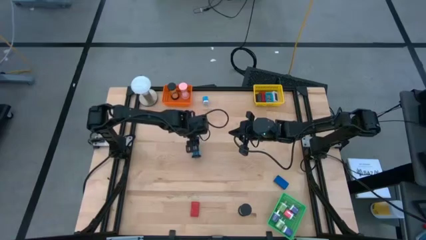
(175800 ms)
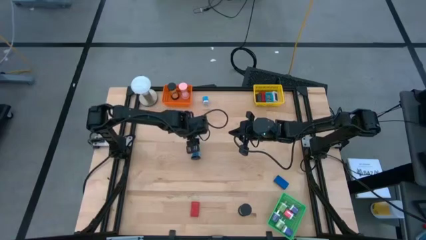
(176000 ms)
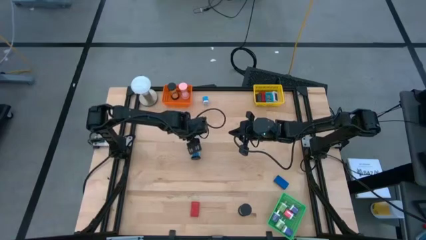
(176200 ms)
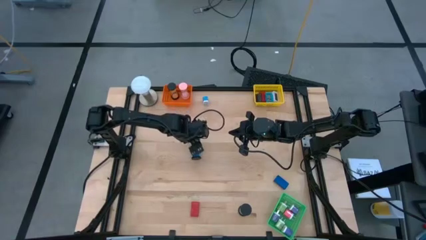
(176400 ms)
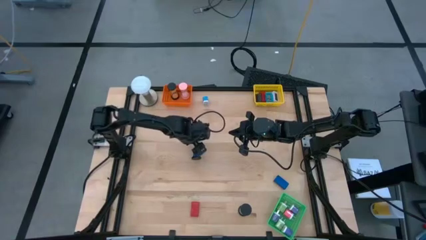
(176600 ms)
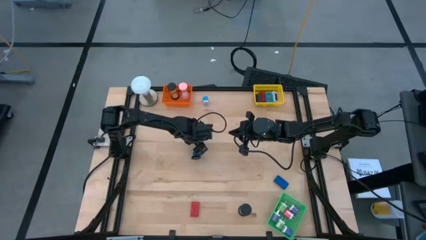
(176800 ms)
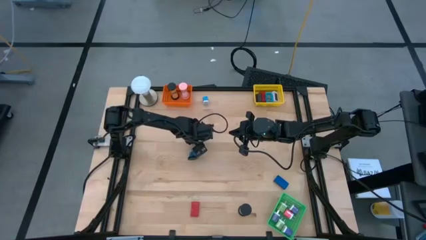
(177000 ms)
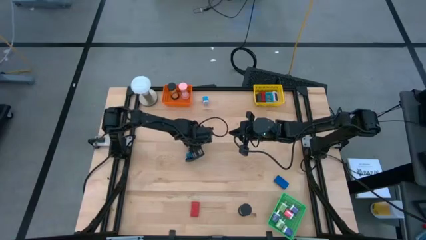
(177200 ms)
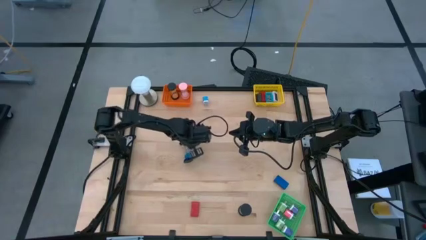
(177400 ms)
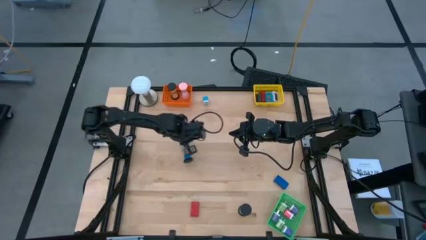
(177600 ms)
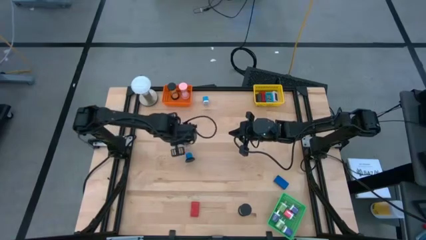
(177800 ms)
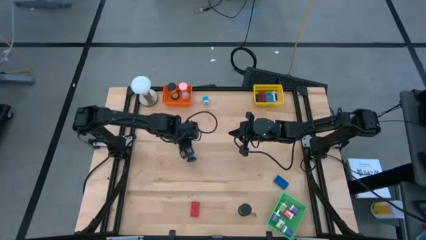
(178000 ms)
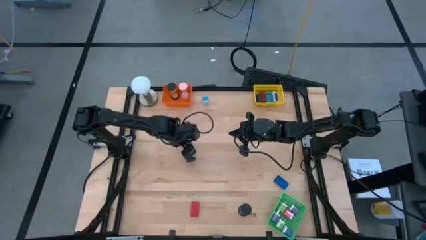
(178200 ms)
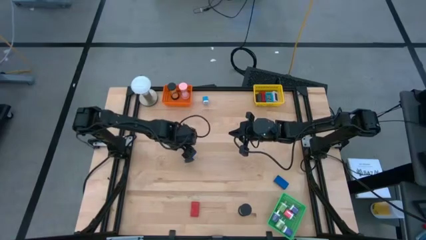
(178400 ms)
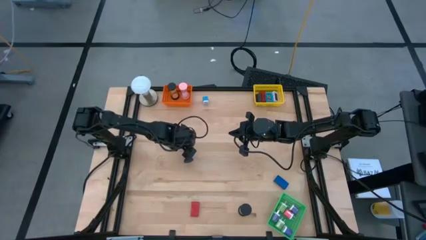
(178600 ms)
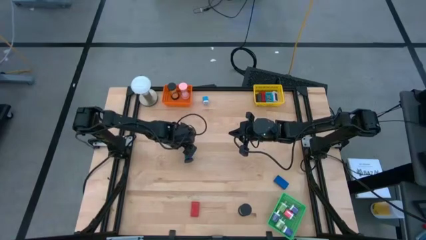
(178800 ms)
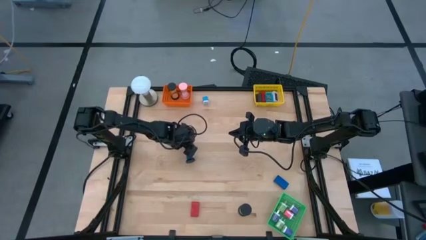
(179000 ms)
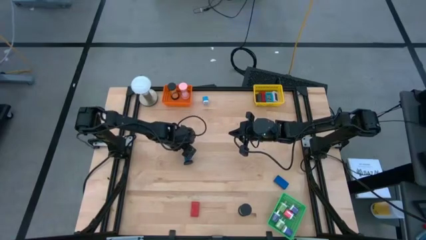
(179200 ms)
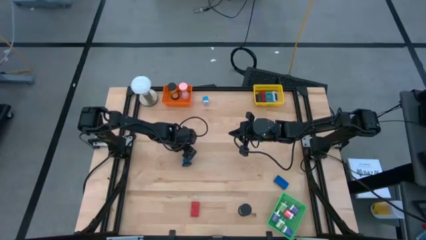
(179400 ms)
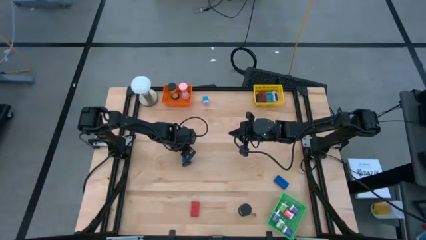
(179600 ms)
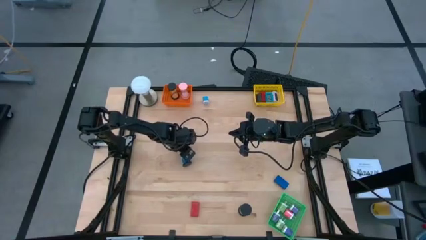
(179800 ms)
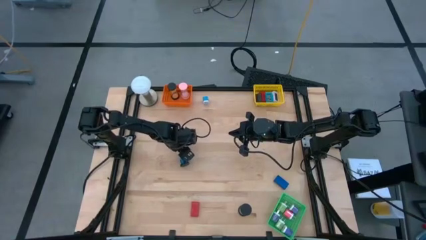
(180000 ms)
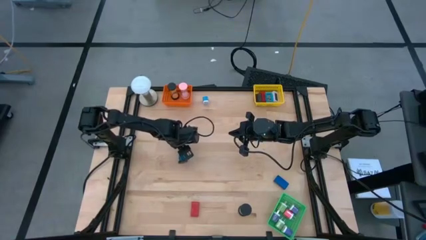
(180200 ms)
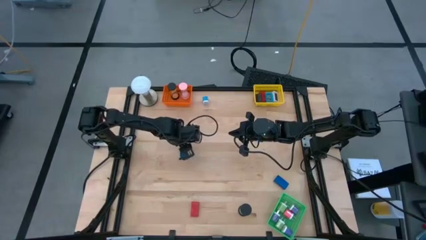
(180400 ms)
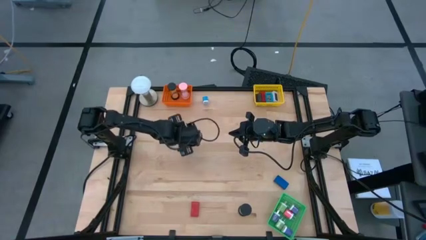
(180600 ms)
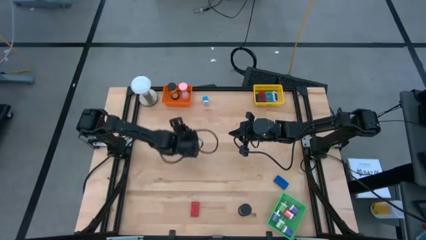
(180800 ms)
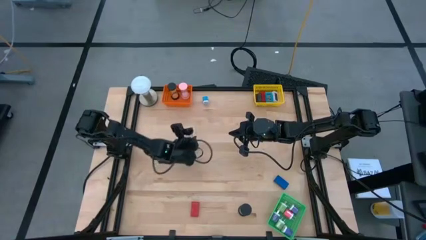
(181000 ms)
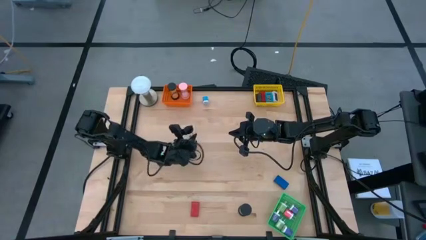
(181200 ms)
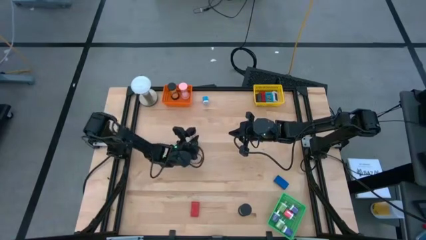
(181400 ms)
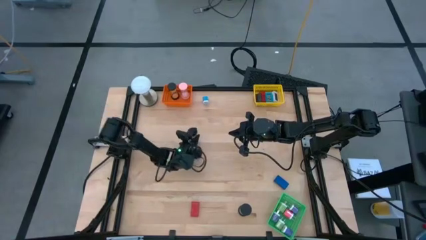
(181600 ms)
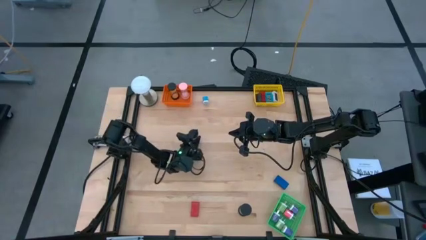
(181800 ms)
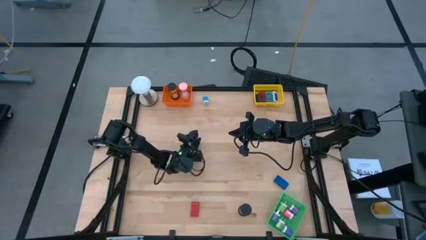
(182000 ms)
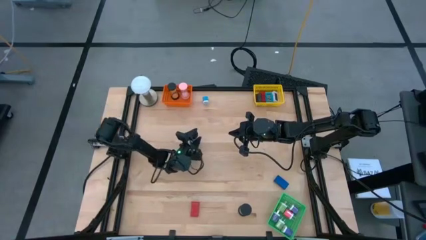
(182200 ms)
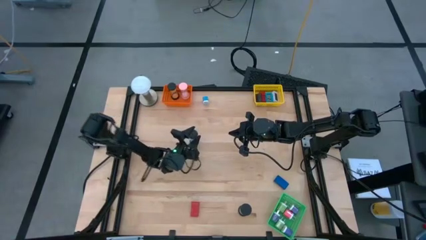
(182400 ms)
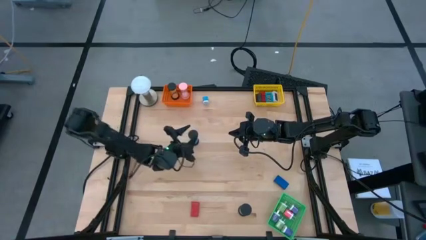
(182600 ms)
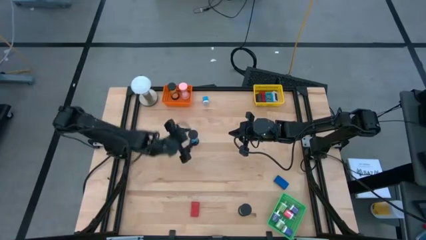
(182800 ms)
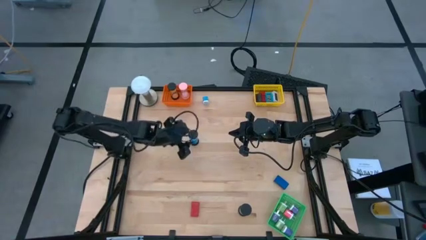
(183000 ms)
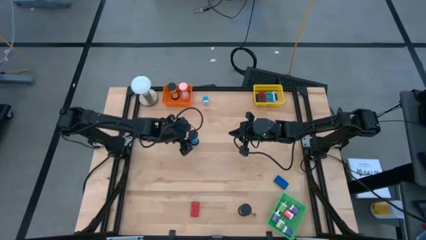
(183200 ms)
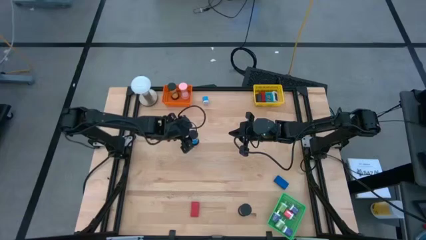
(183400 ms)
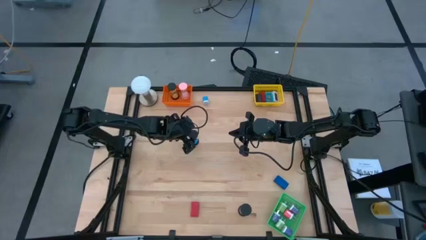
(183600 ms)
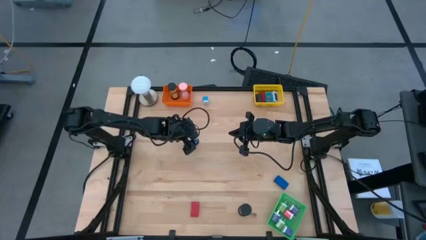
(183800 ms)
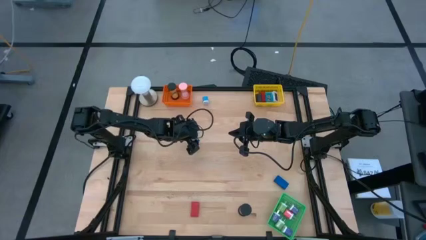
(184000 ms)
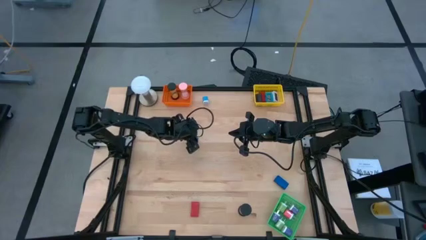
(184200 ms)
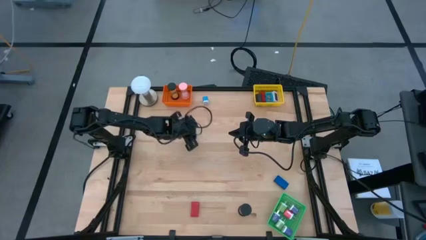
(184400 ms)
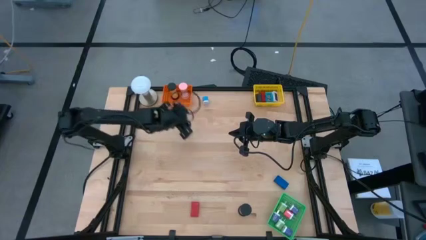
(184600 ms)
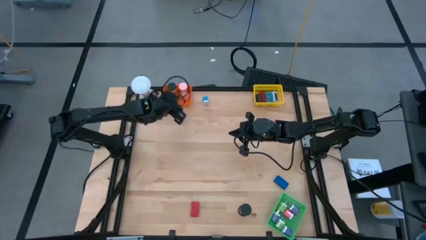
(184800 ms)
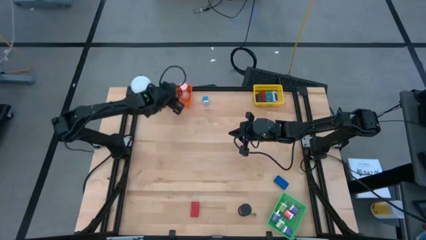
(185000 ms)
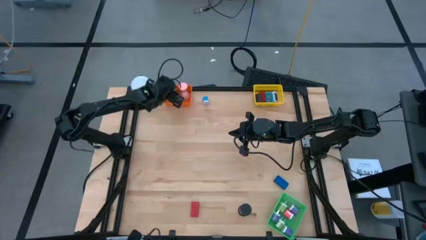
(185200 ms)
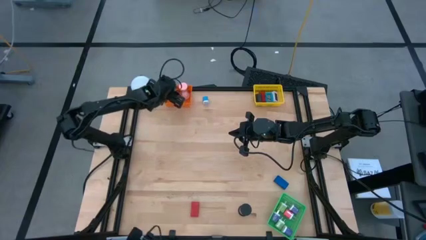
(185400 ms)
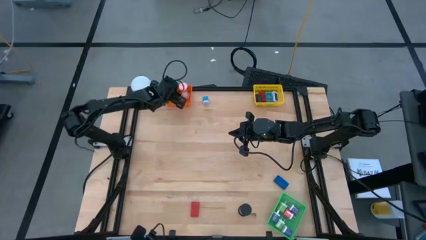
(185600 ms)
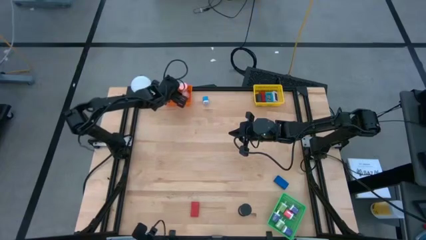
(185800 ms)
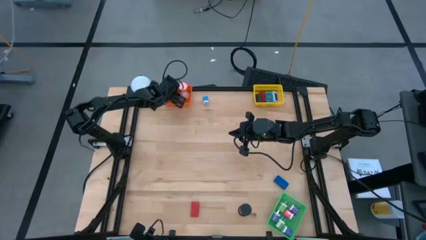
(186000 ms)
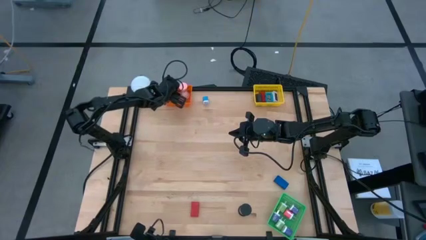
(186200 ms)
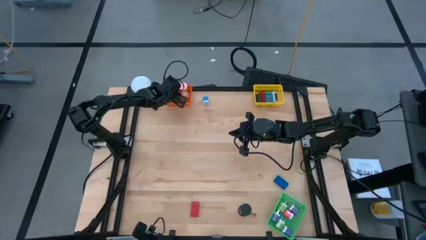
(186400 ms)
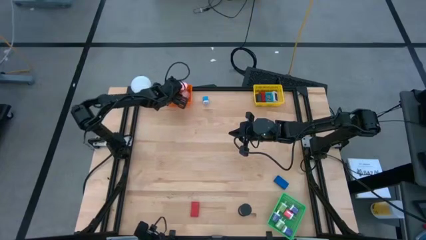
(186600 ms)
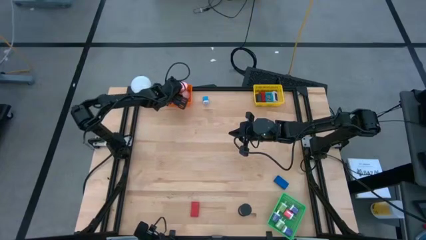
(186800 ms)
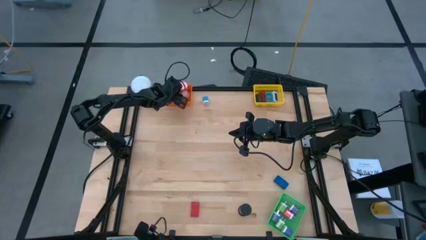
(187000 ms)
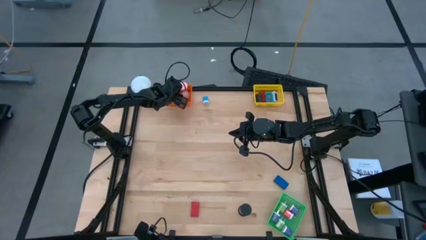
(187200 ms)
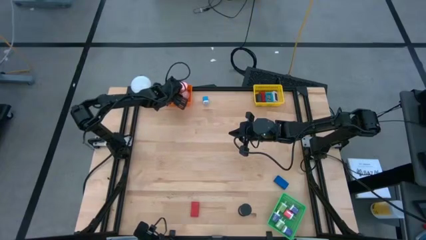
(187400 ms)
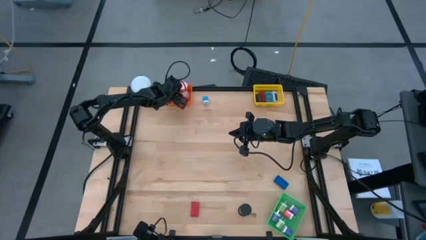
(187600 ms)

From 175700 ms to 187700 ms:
Task: Pick & Place Office items
Put the black hourglass into the orange basket

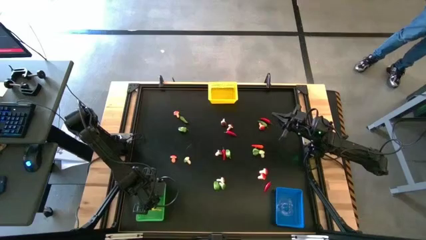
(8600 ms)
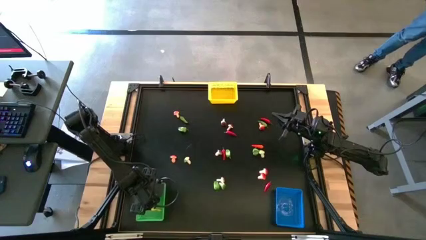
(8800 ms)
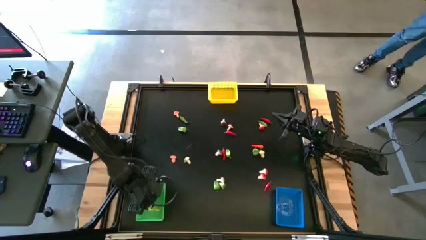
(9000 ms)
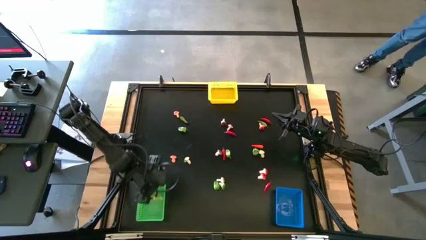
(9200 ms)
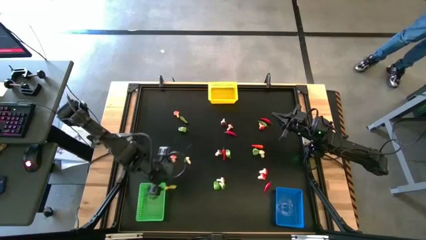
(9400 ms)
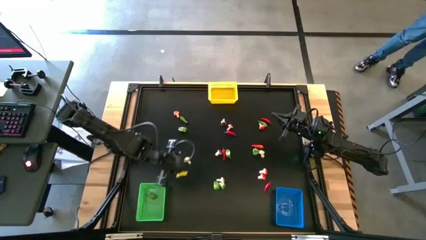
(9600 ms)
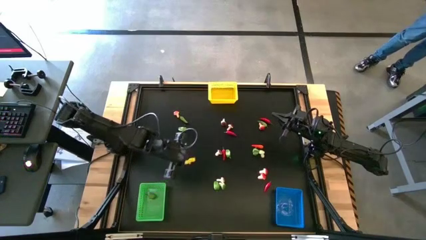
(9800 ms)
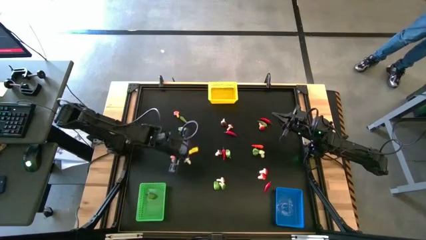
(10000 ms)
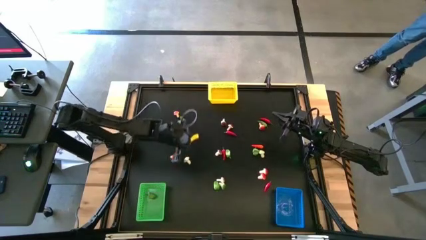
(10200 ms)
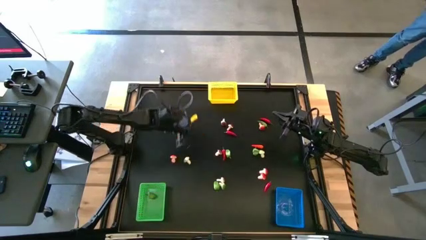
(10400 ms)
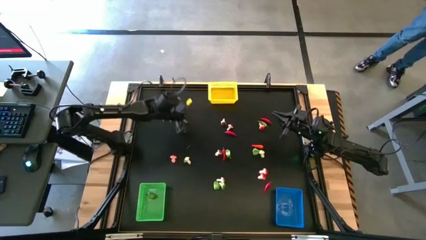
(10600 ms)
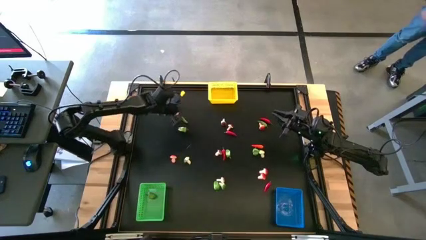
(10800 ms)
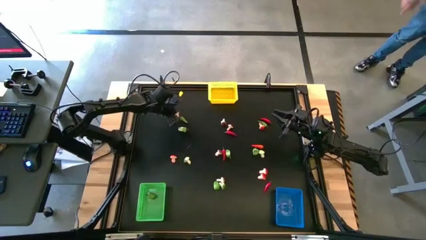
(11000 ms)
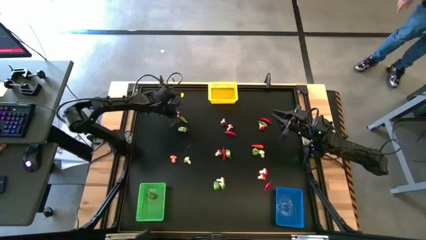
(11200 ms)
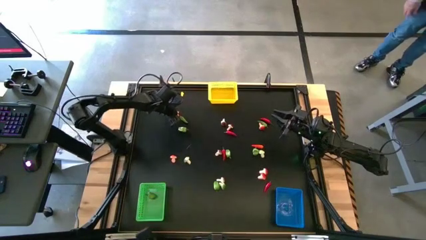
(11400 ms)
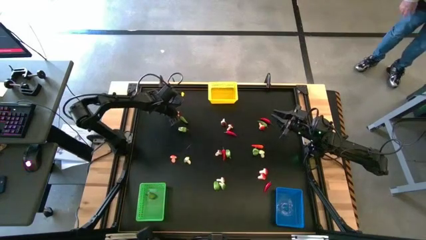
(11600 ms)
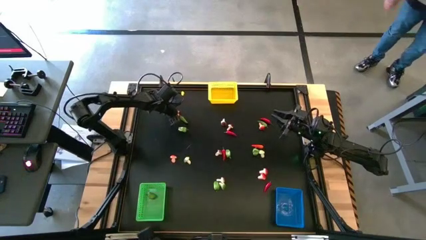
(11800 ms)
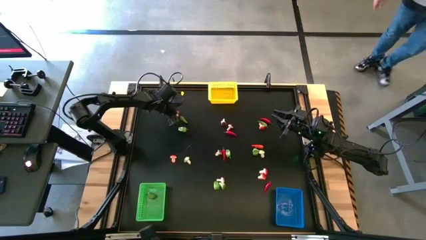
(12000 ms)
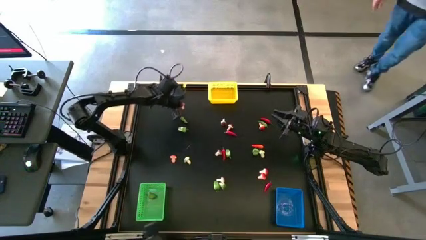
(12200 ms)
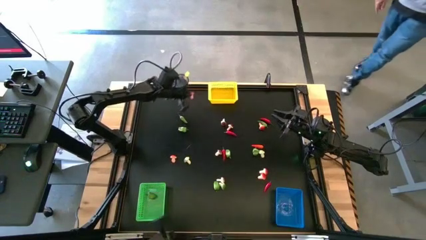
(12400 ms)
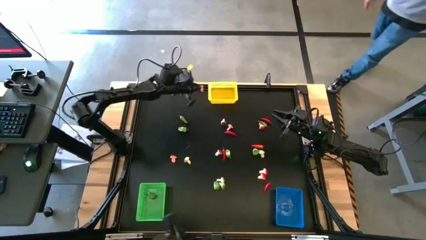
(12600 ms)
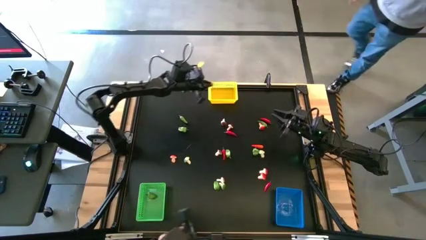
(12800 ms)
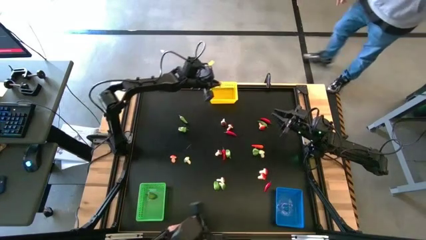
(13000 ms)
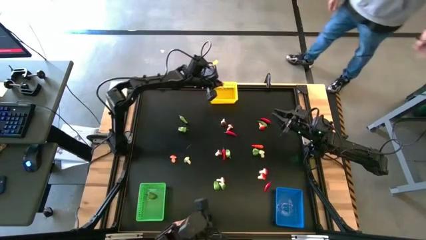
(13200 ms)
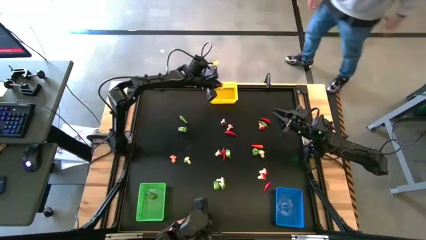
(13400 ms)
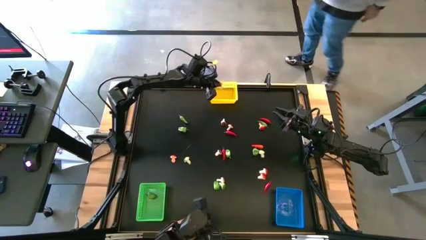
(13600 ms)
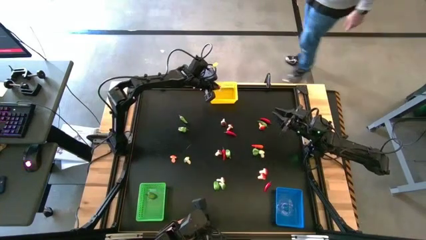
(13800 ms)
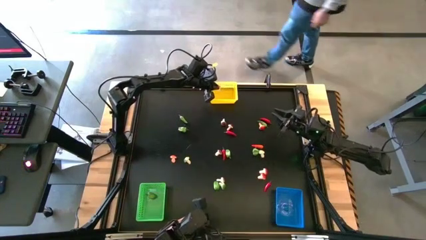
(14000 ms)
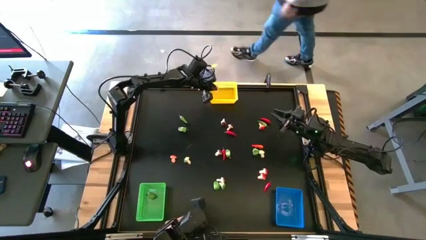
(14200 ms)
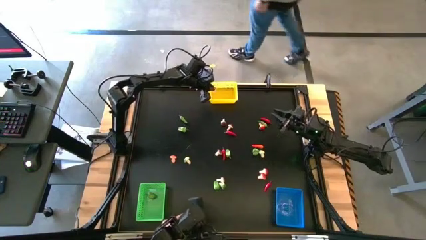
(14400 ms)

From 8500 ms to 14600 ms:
Task: Sort produce into baskets
Put the middle left red mushroom into the yellow bin
